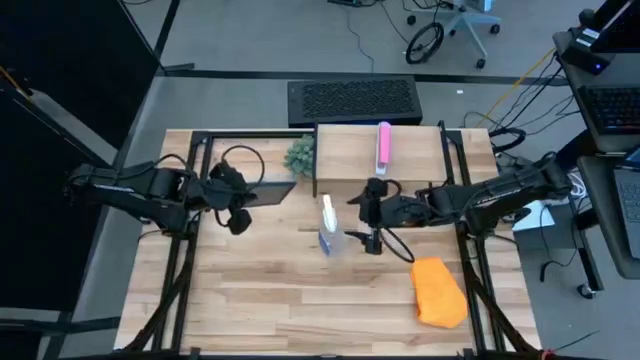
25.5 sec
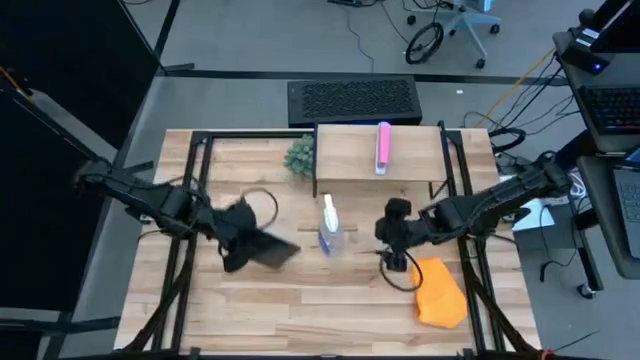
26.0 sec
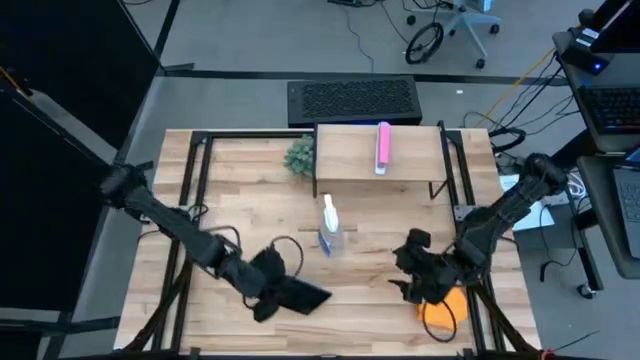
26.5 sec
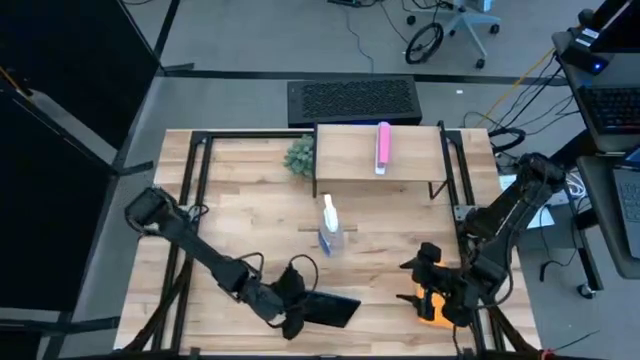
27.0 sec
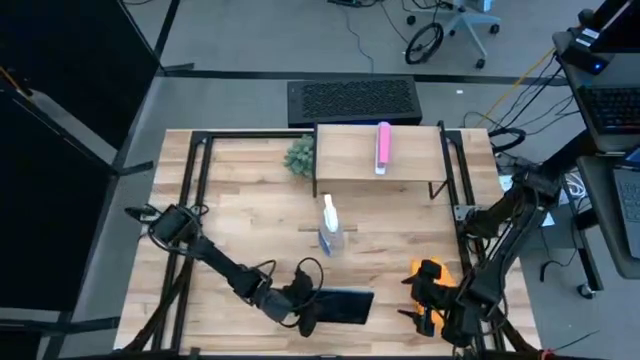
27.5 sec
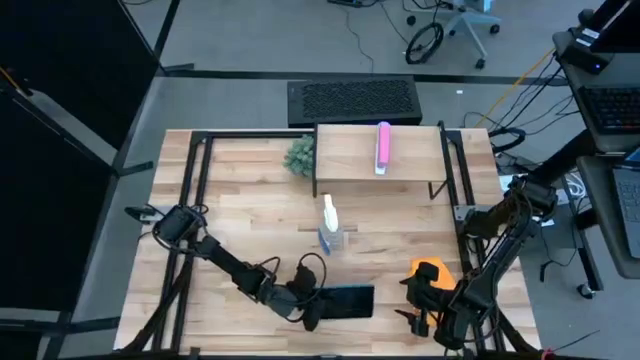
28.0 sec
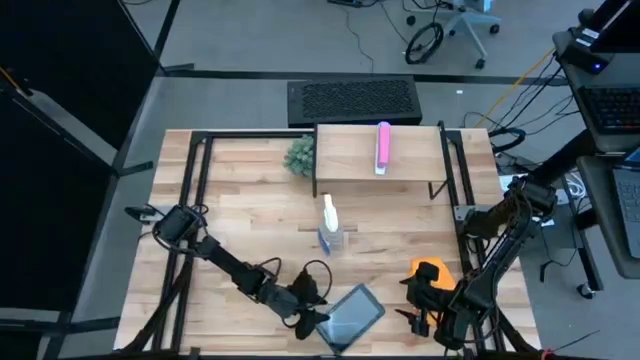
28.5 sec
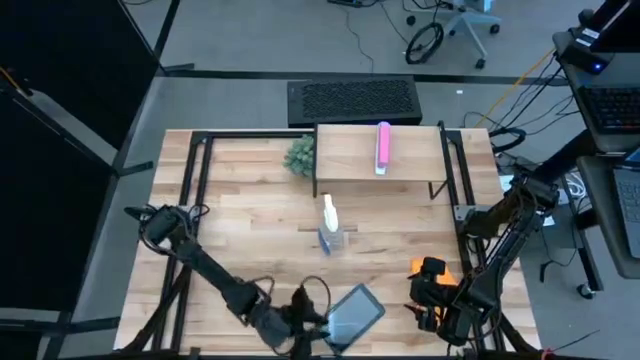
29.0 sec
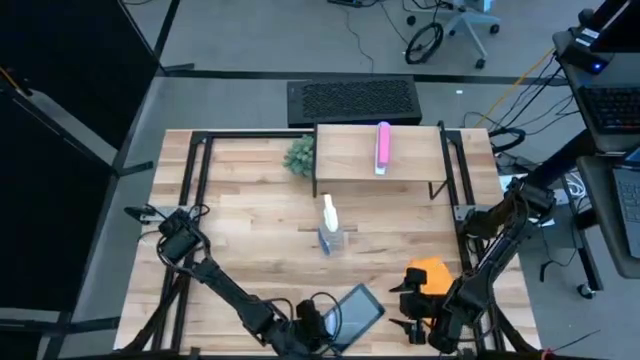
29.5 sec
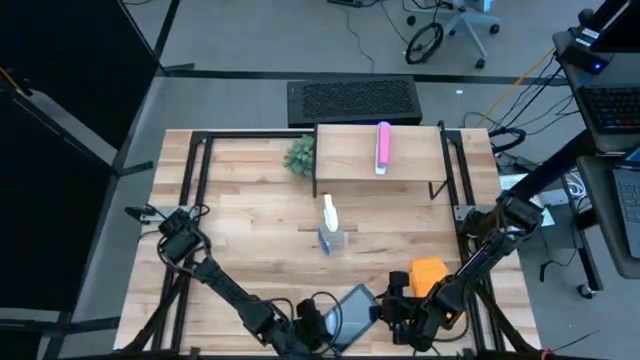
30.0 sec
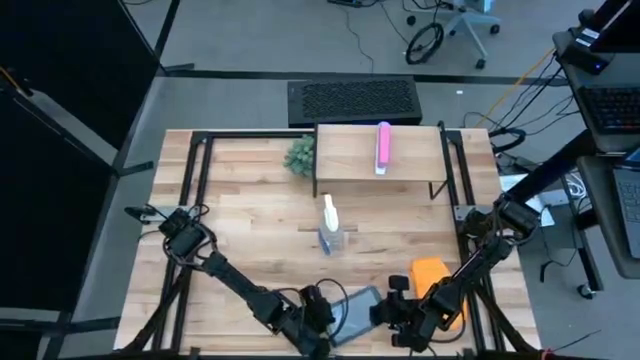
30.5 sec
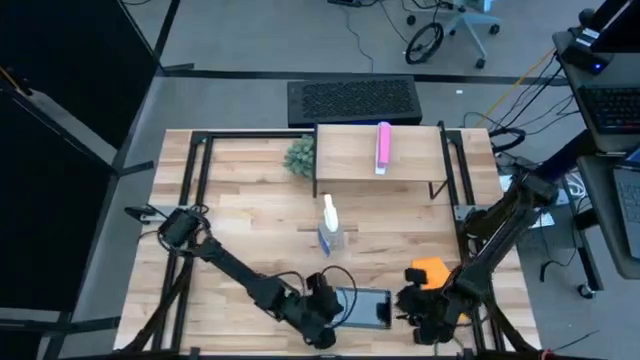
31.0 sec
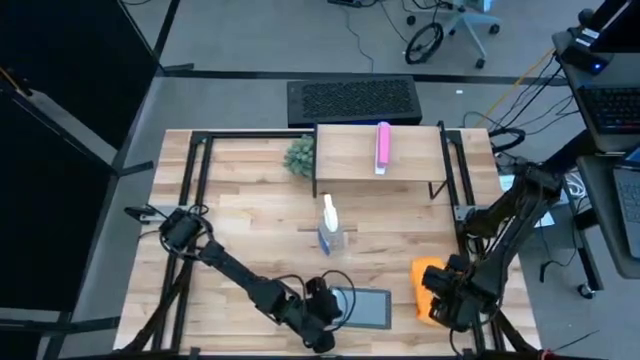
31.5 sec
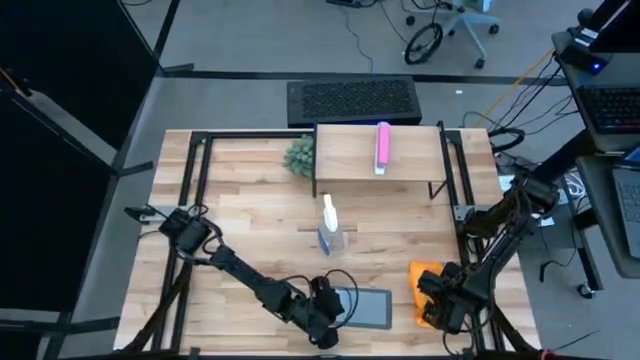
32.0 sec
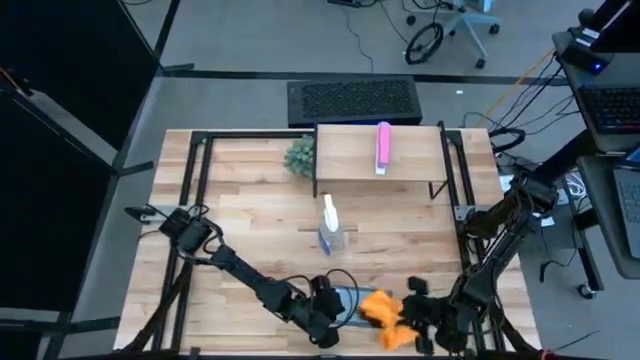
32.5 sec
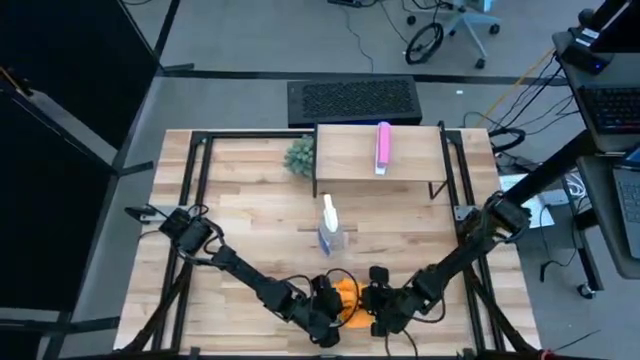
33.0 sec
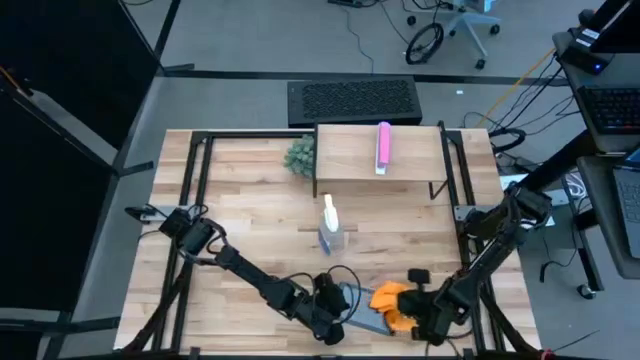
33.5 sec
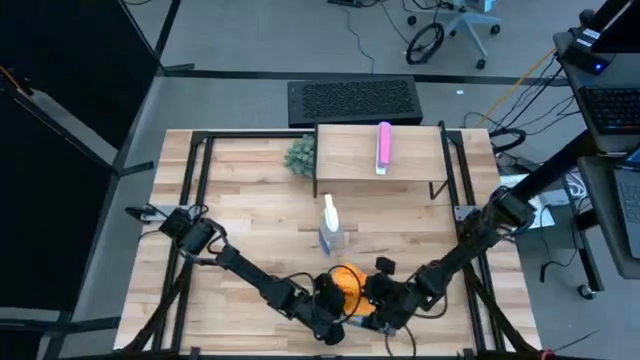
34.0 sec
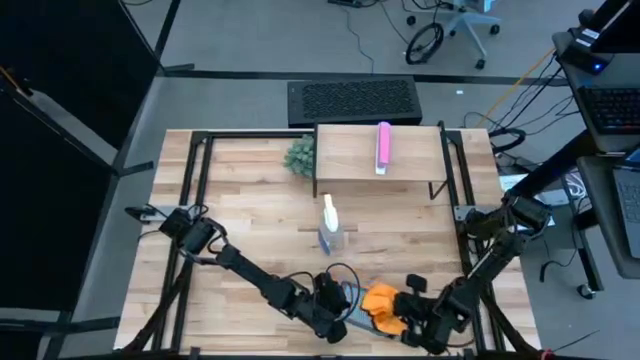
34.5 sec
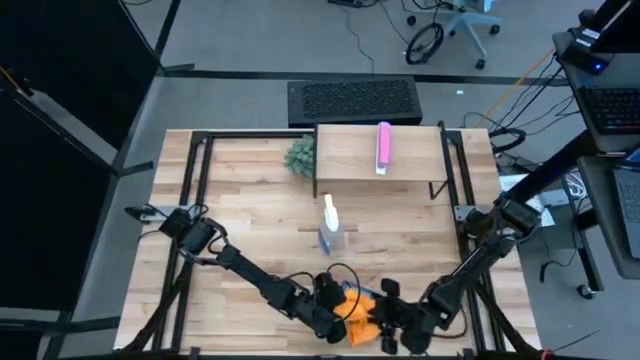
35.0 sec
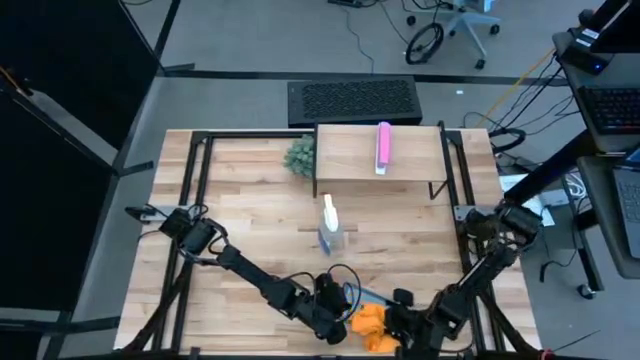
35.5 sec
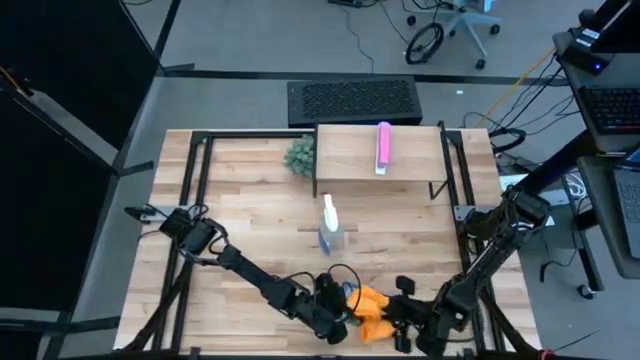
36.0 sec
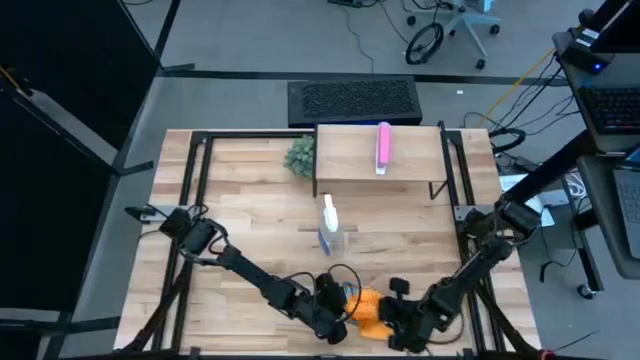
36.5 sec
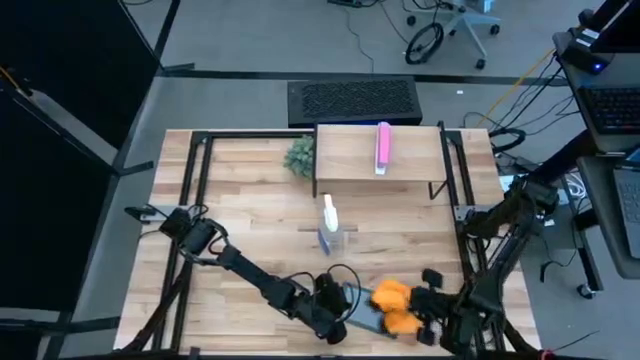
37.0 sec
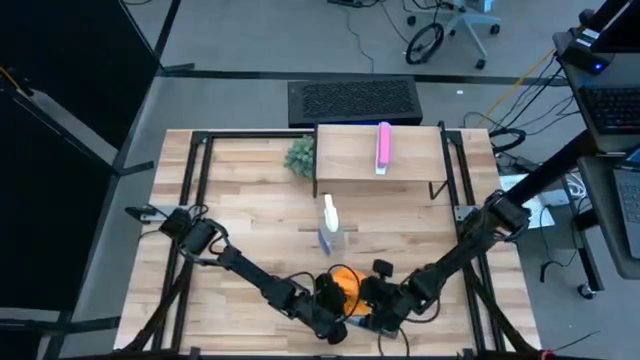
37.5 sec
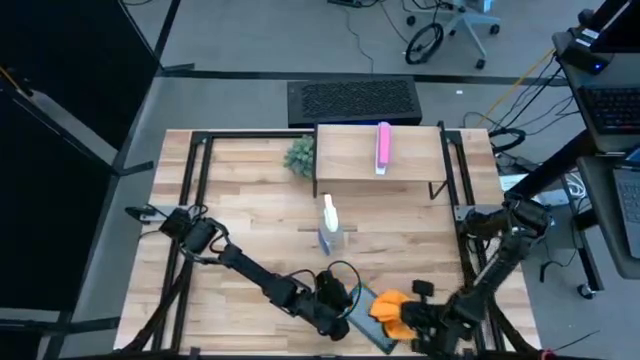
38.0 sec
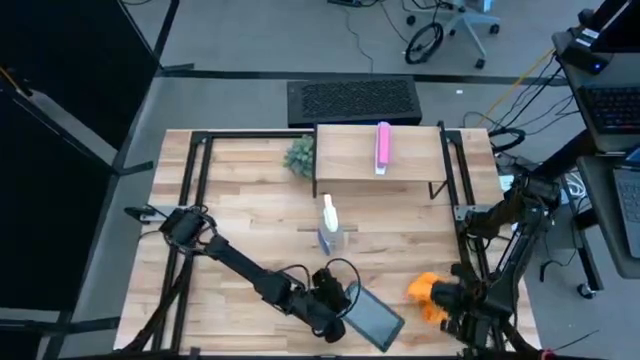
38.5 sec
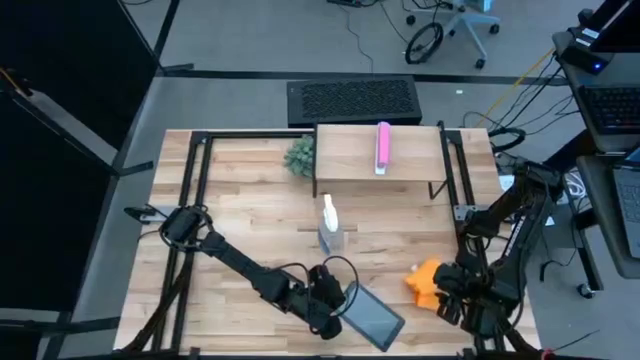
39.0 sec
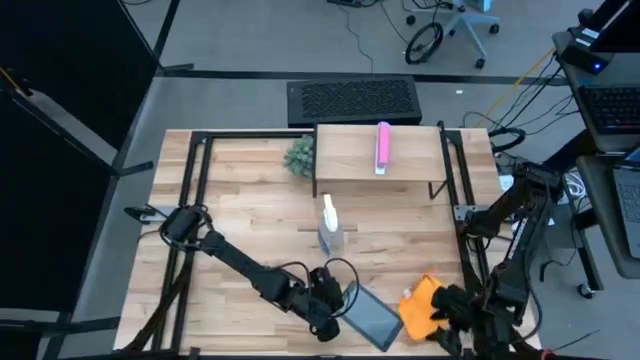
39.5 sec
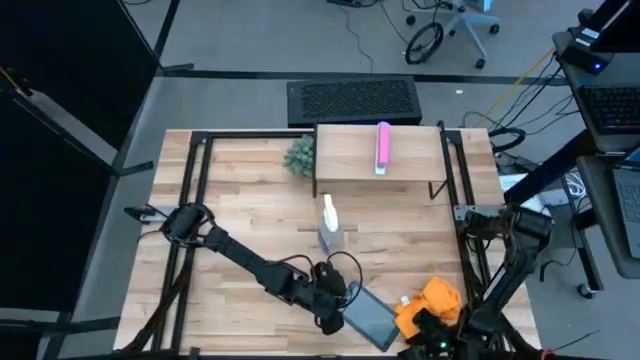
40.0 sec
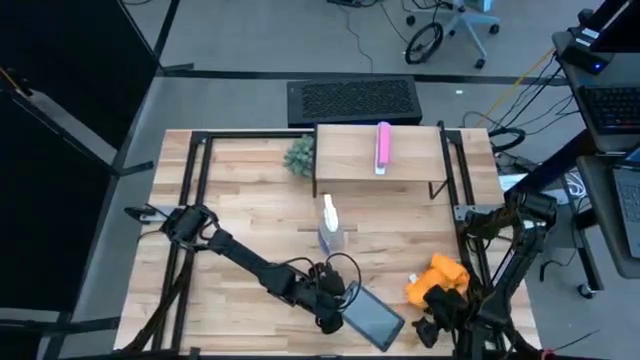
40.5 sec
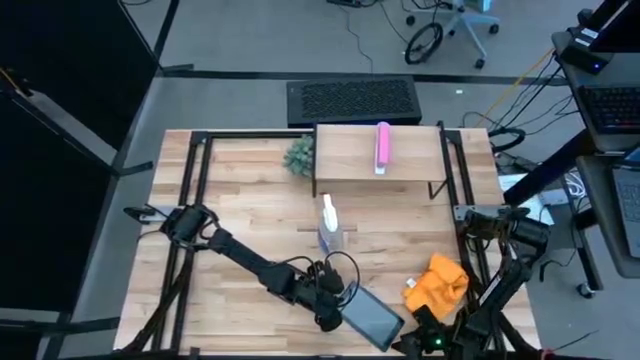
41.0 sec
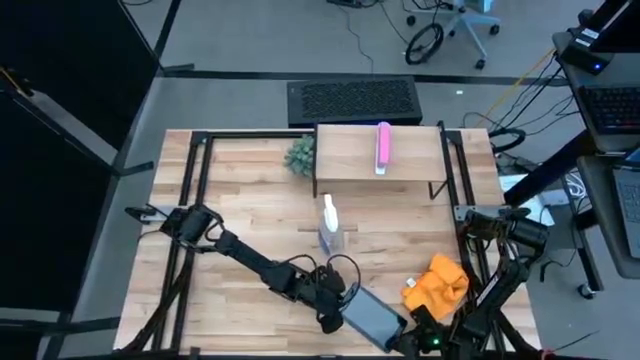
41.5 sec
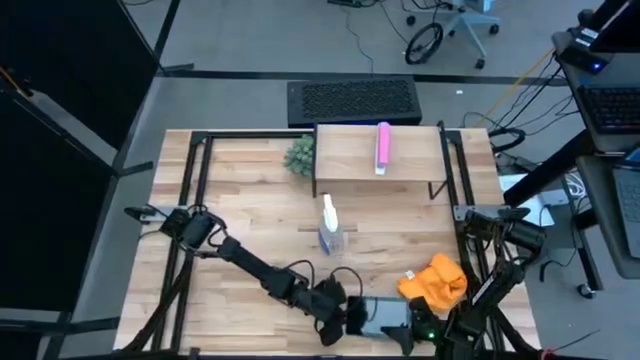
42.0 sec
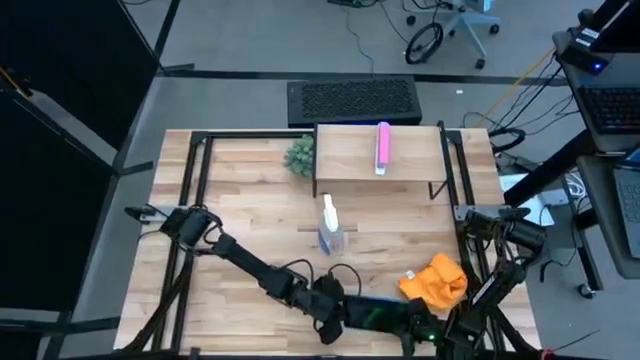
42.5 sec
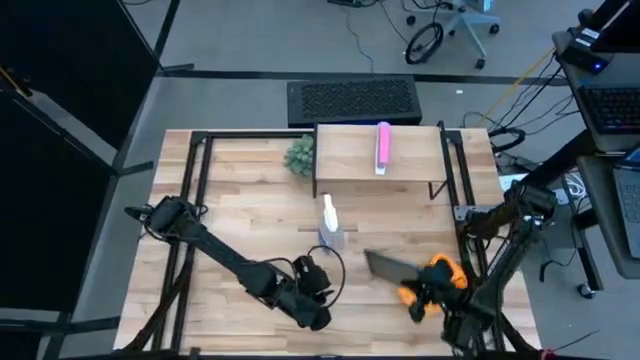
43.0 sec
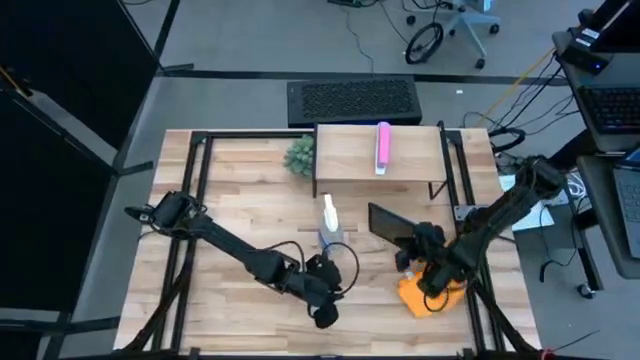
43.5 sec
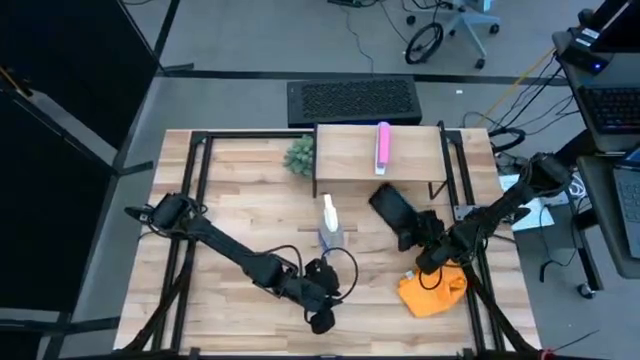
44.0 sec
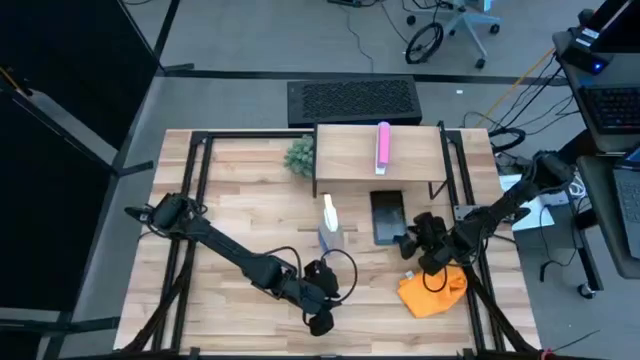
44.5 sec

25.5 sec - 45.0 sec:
Task: Apply microfiber cloth
Wipe the front of the tablet with the orange microfiber cloth

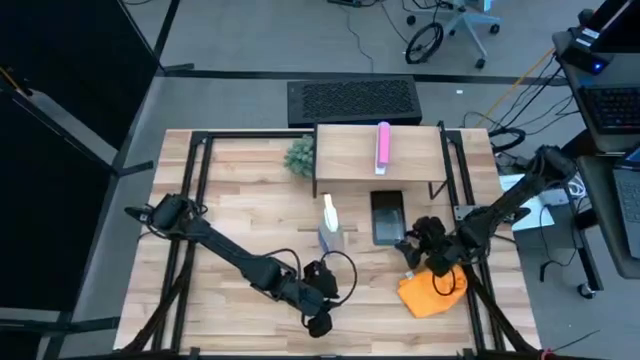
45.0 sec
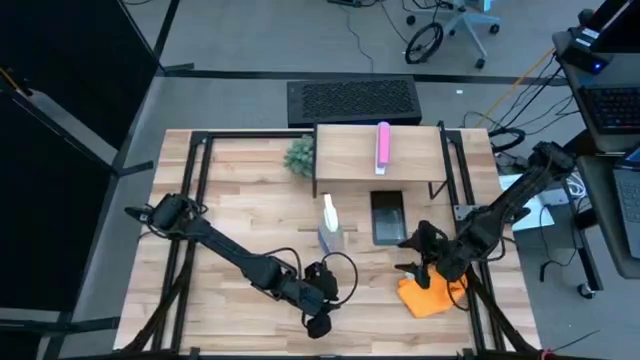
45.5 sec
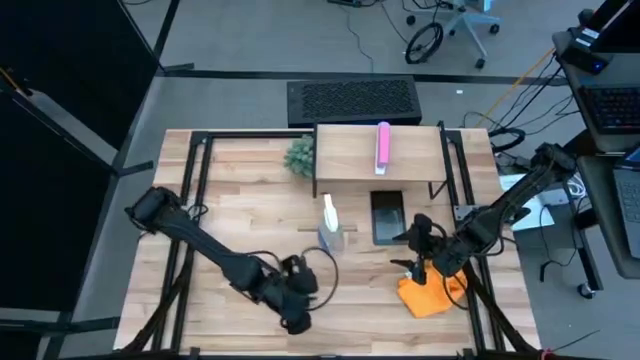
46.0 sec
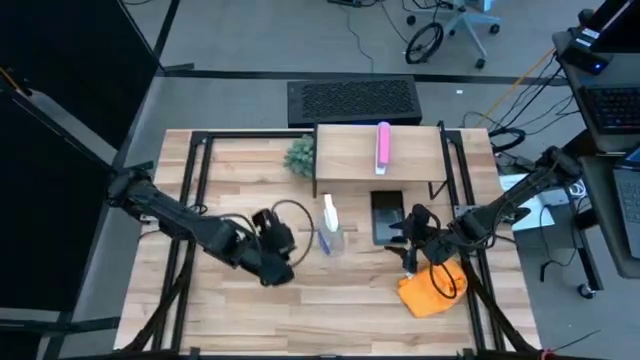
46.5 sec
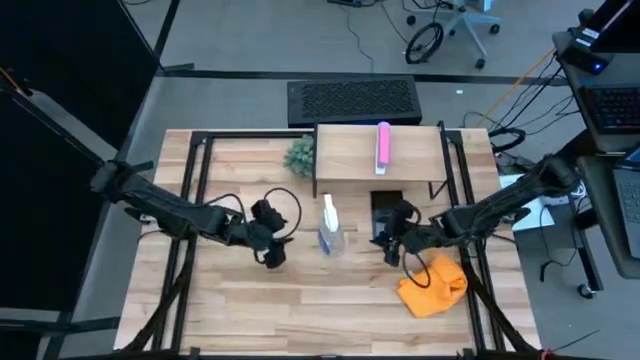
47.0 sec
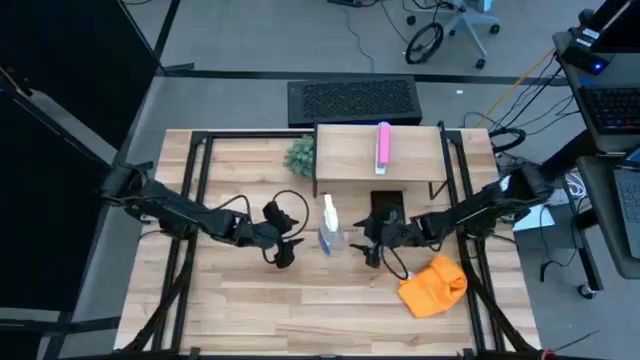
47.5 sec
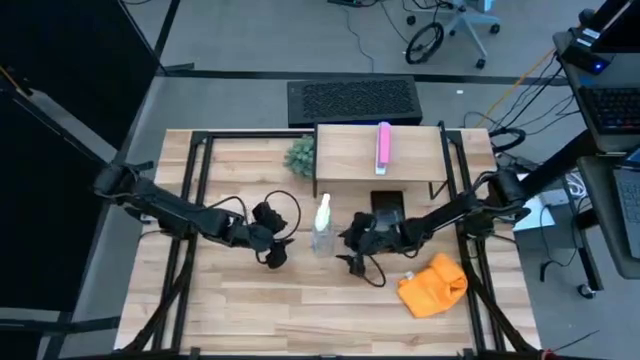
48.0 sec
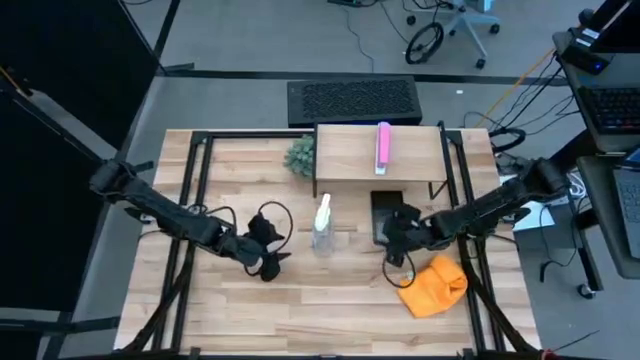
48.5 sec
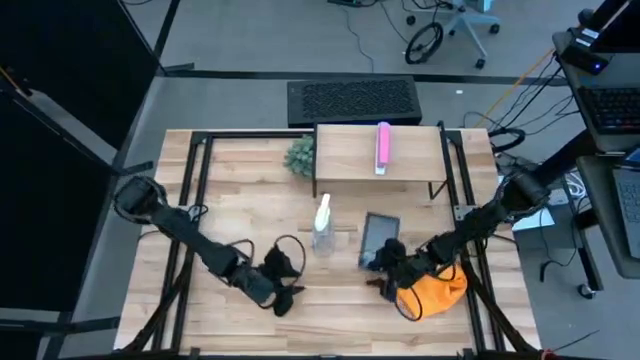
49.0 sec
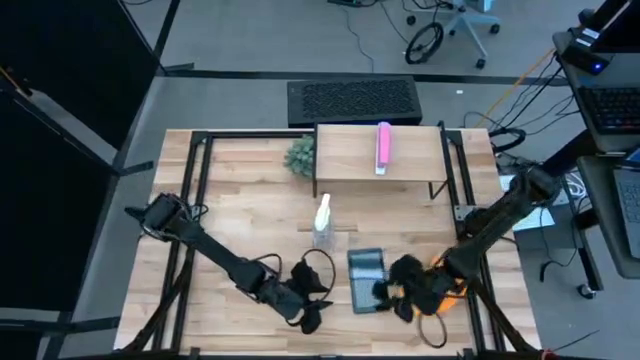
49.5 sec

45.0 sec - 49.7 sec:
Move the tablet to the bottom of the table
